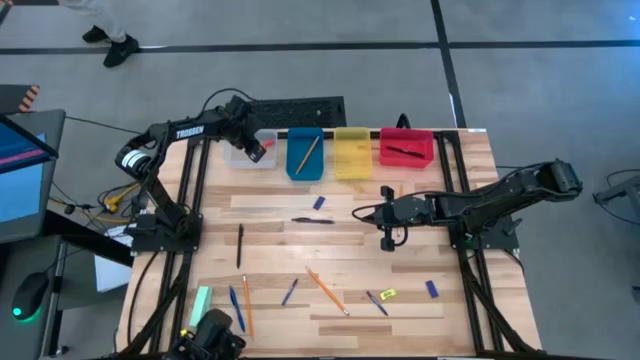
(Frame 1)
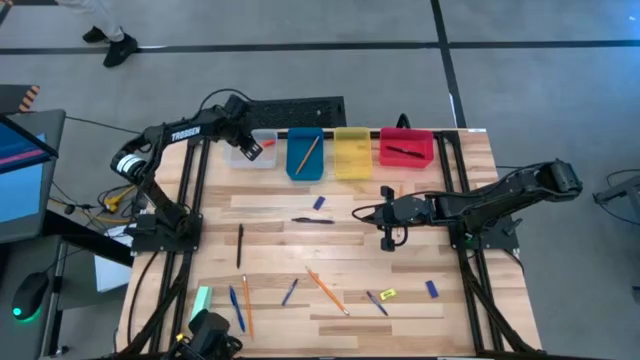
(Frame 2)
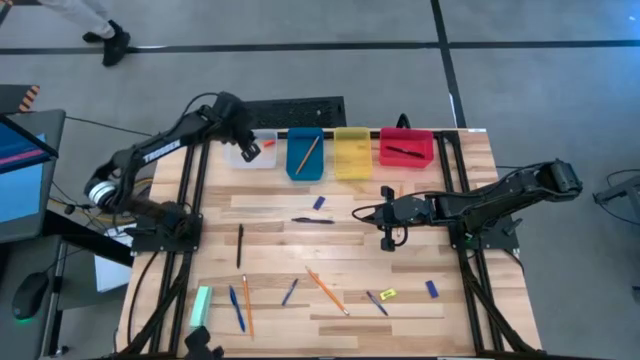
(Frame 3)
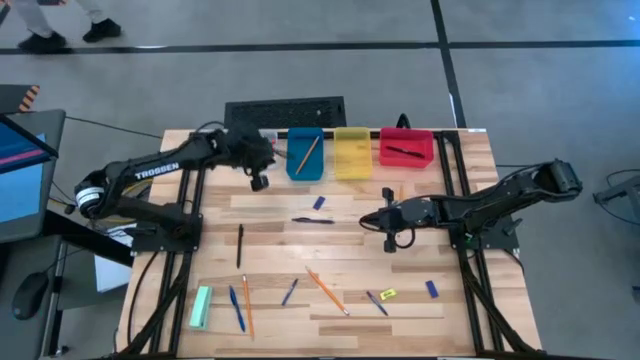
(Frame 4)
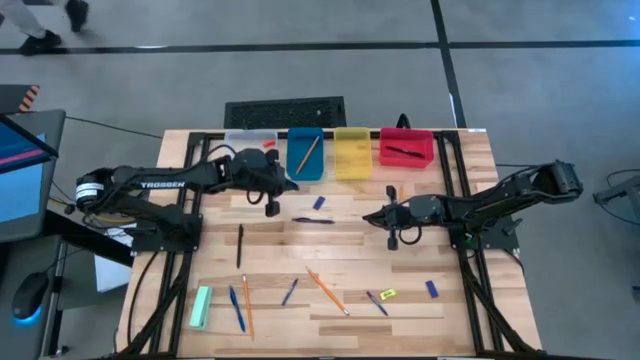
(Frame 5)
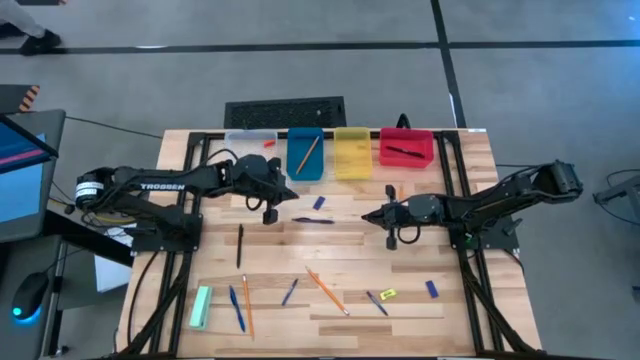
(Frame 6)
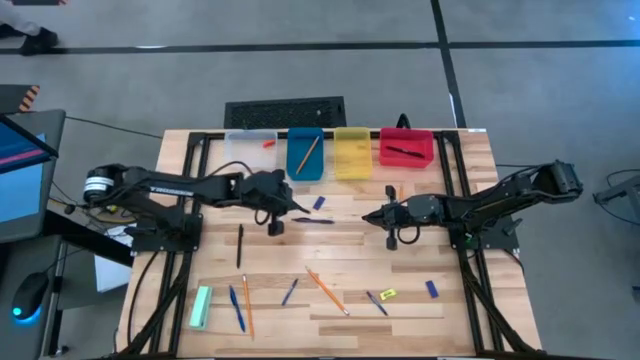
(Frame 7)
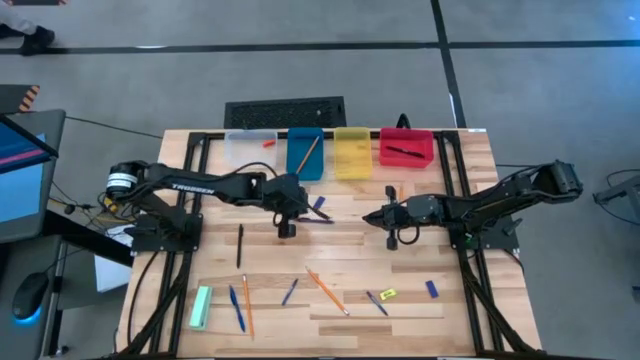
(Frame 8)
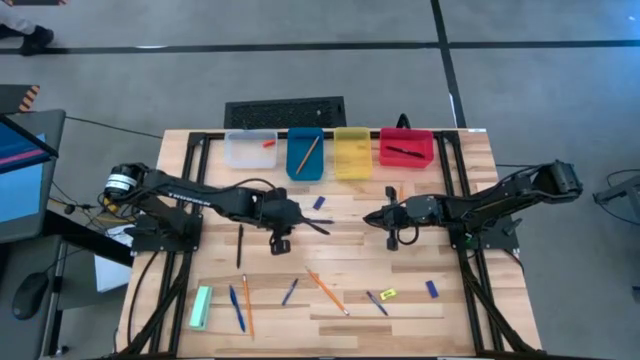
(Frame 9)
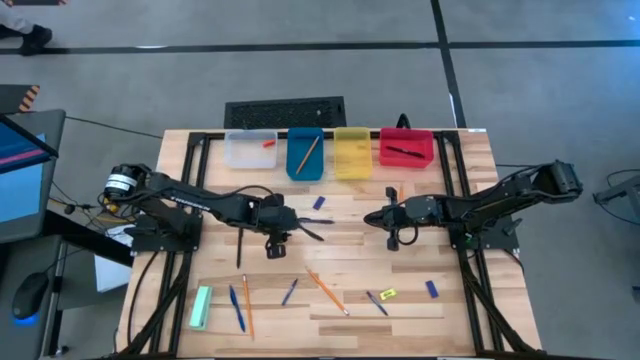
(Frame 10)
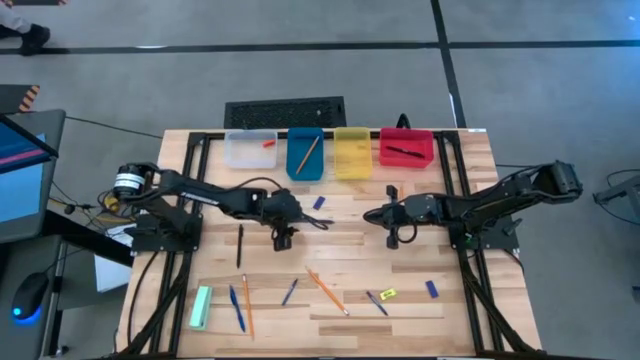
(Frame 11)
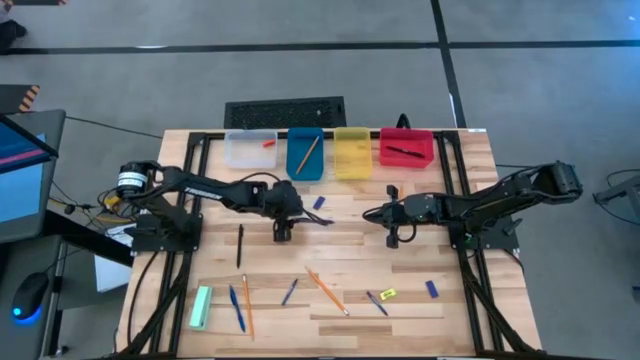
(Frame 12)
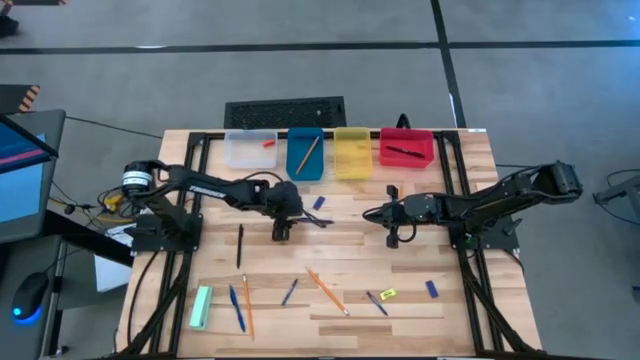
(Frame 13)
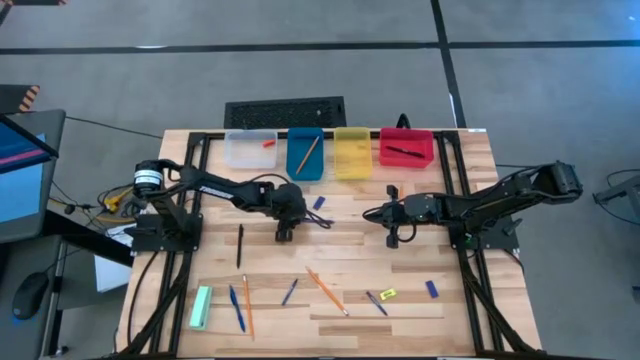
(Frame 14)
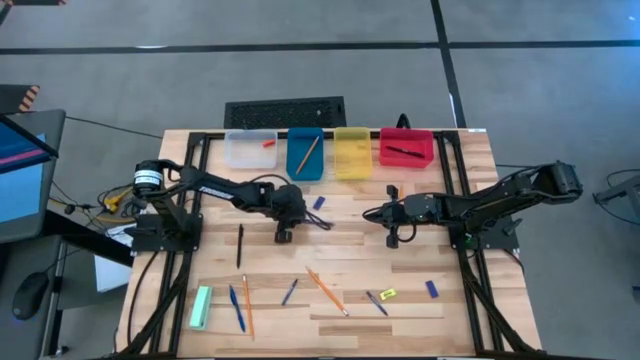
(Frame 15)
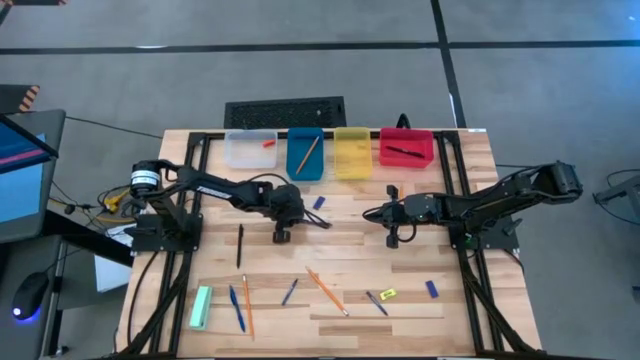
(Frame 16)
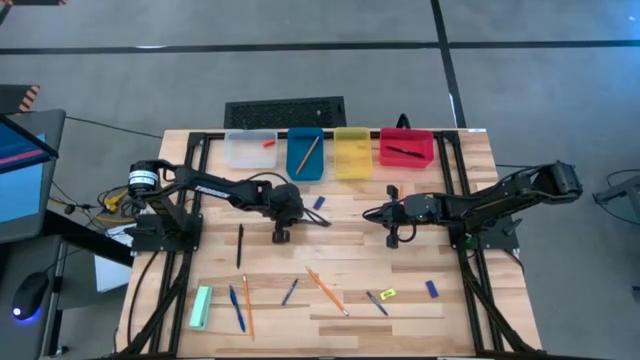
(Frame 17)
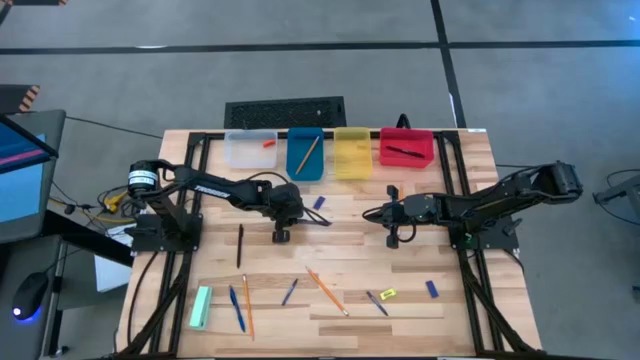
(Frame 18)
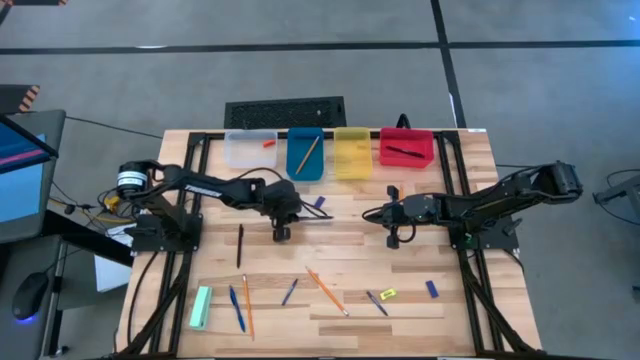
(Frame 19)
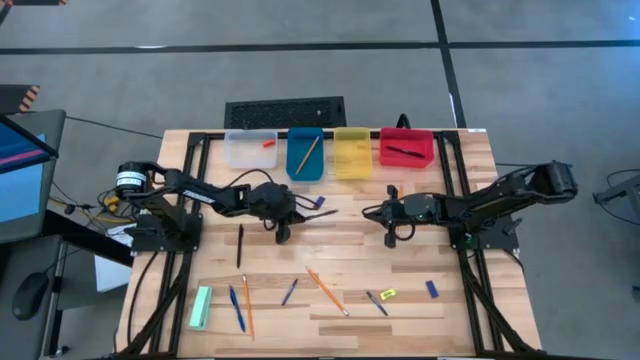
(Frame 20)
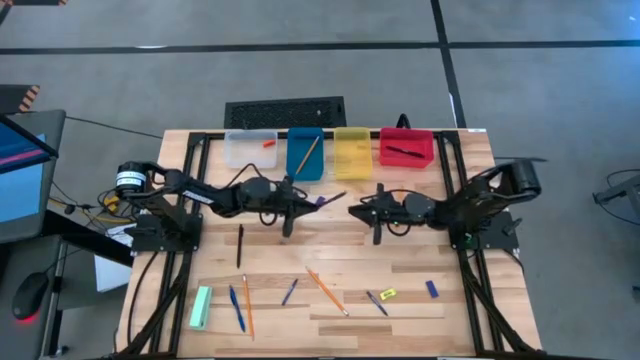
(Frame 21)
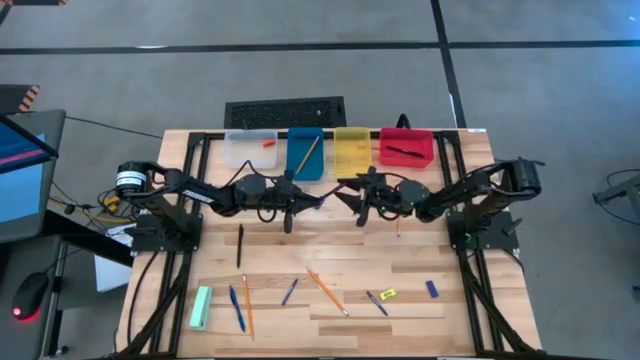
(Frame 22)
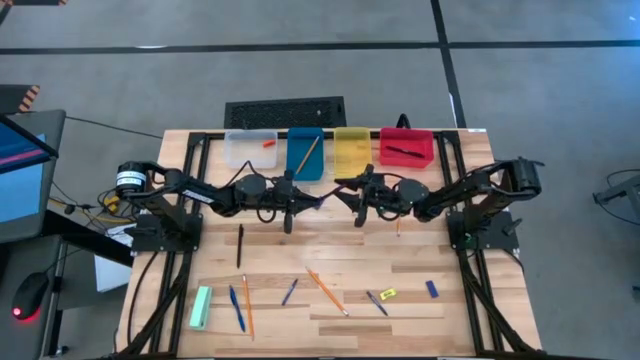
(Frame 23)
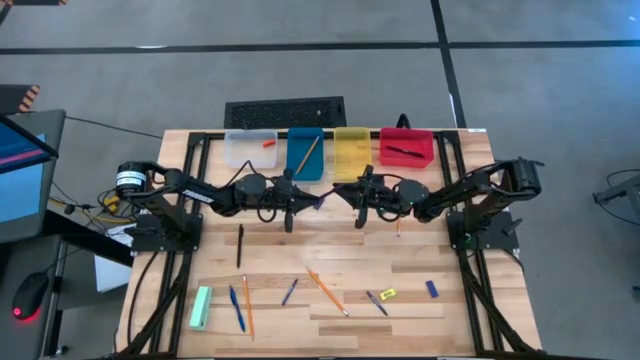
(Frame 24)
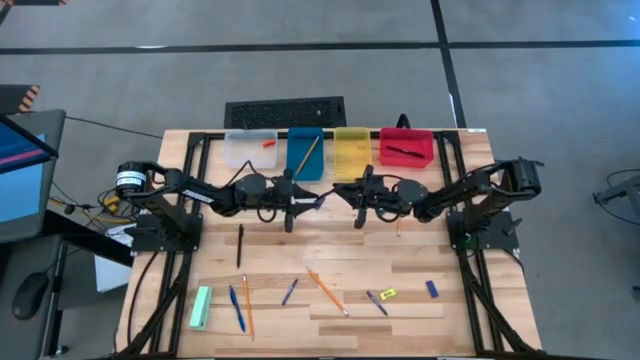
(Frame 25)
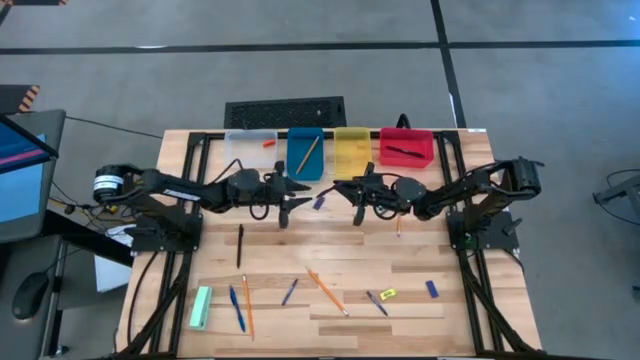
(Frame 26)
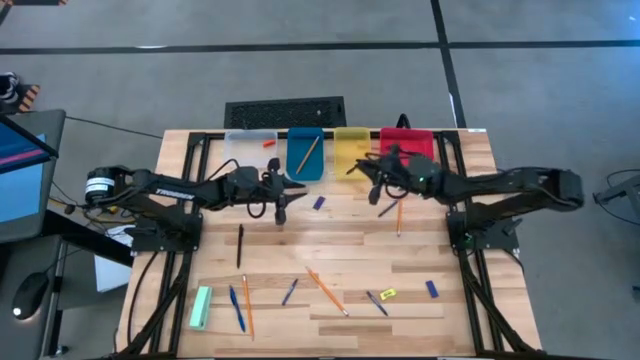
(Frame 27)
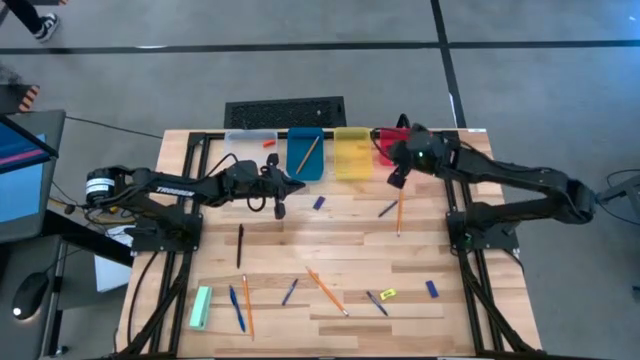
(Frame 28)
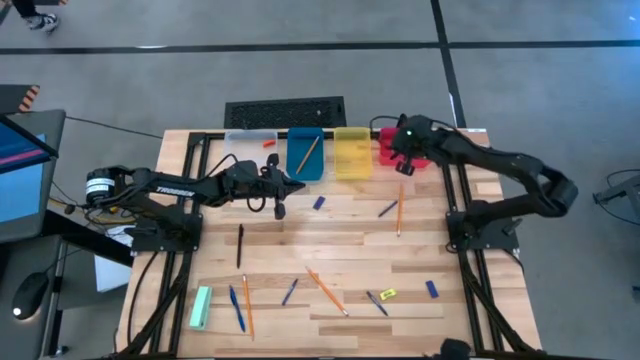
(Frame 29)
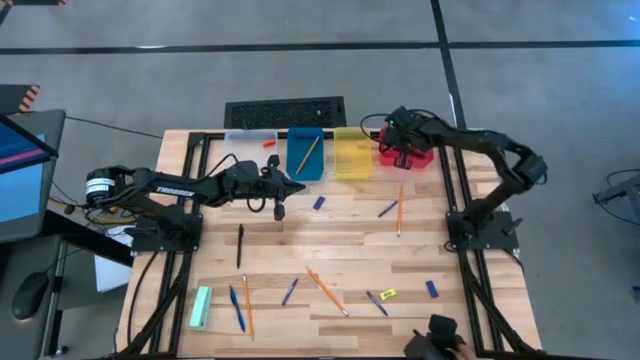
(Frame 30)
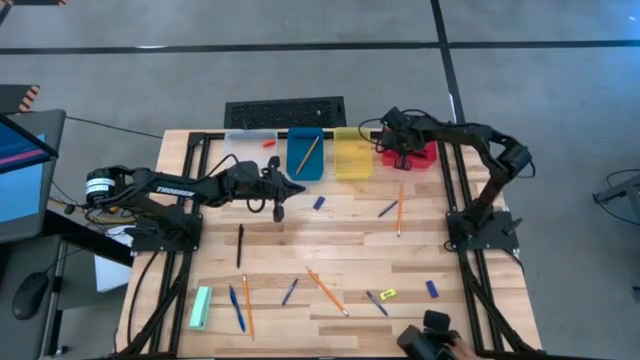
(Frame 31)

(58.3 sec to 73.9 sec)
Task: Sort crayons/erasers/pens/pencils in bins
Put the violet pen into the red bin

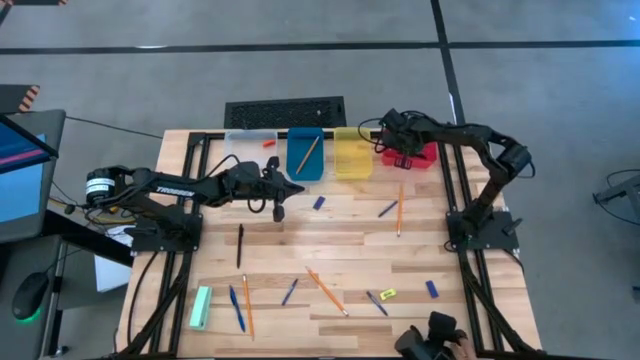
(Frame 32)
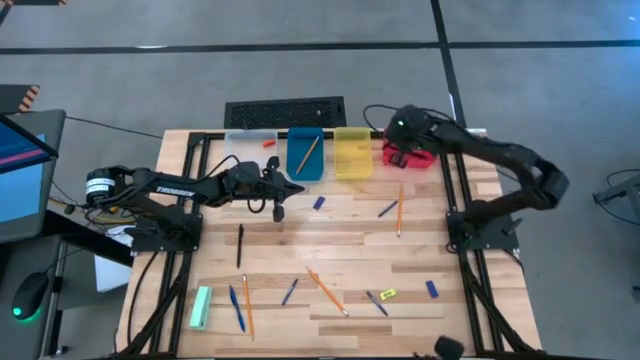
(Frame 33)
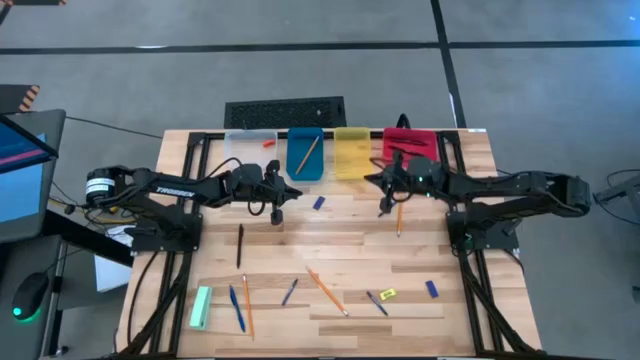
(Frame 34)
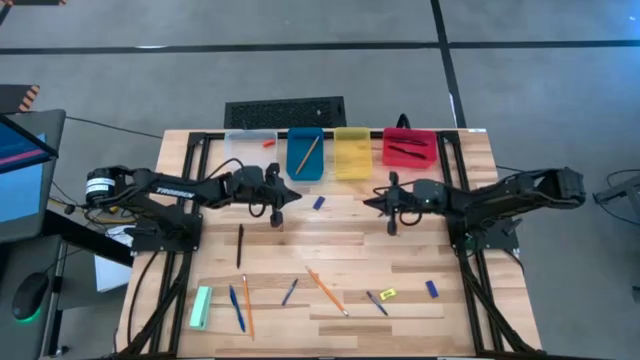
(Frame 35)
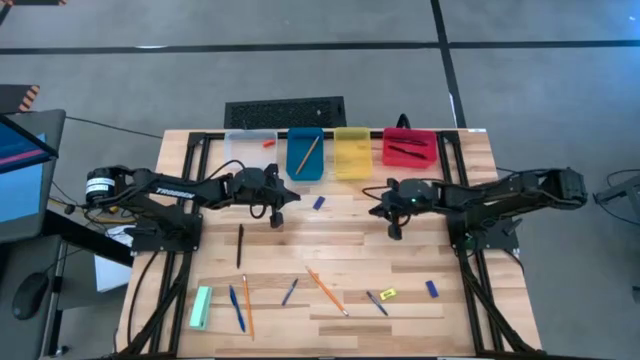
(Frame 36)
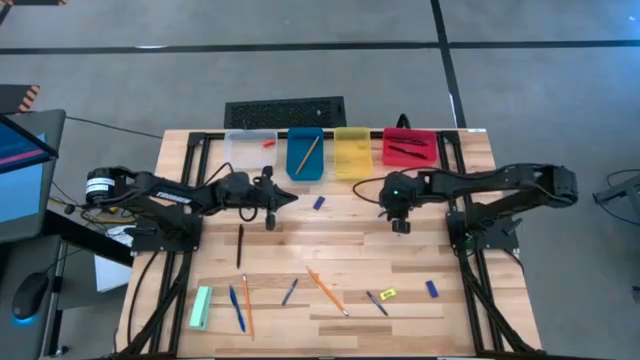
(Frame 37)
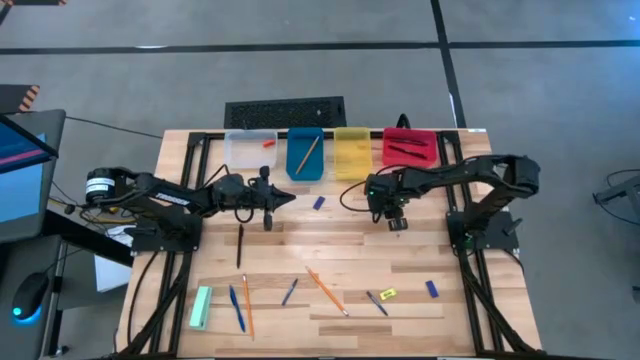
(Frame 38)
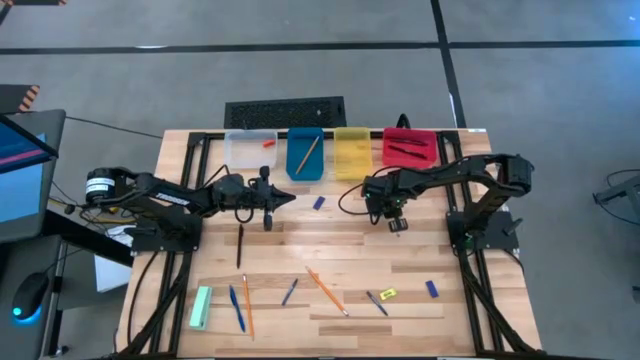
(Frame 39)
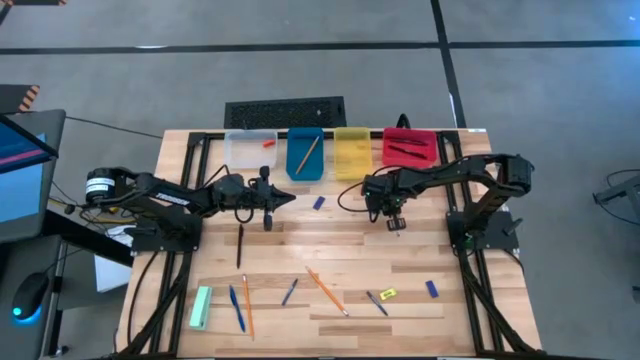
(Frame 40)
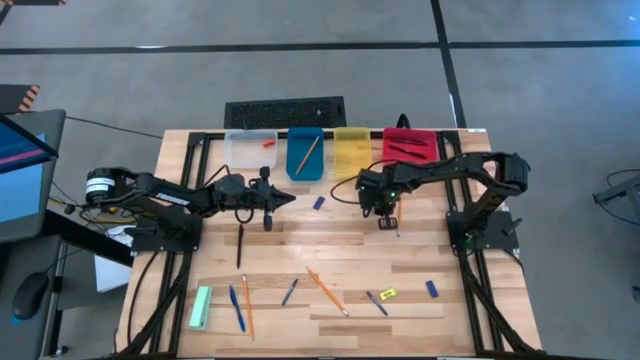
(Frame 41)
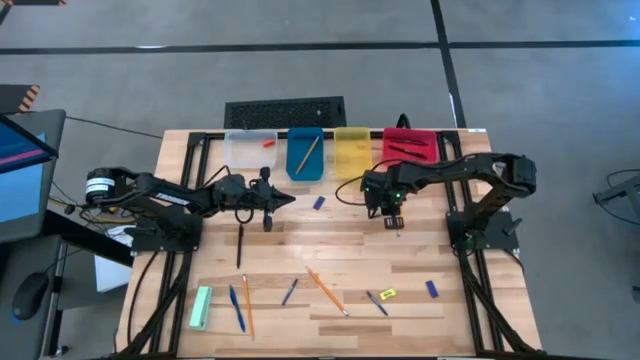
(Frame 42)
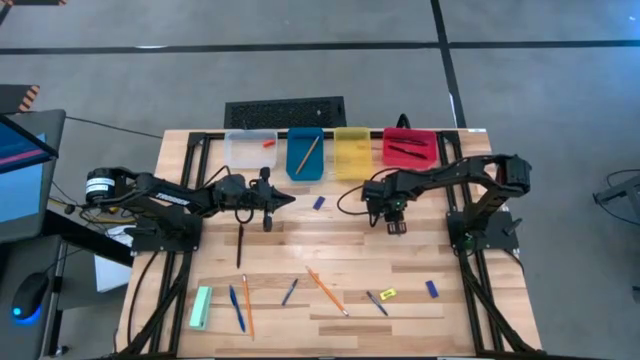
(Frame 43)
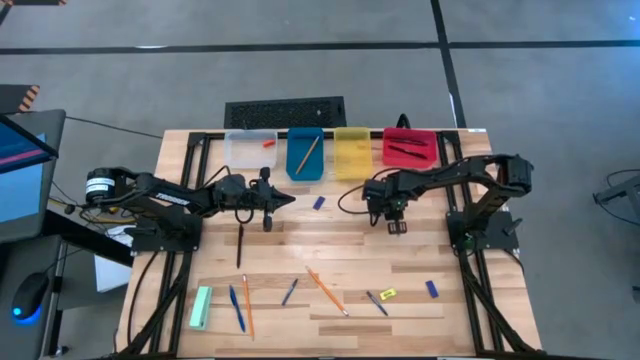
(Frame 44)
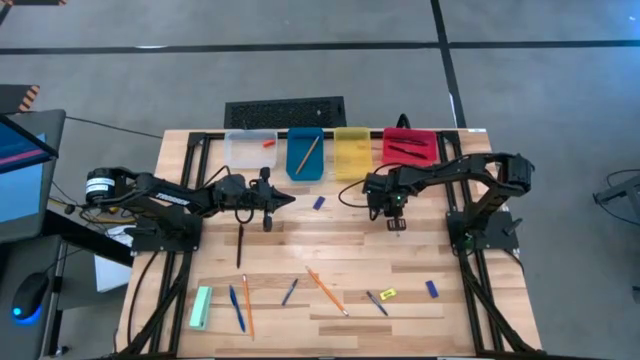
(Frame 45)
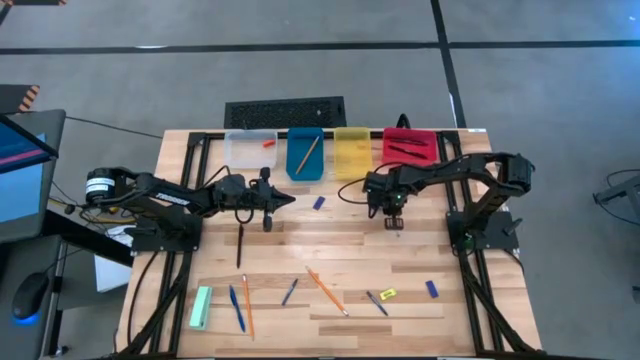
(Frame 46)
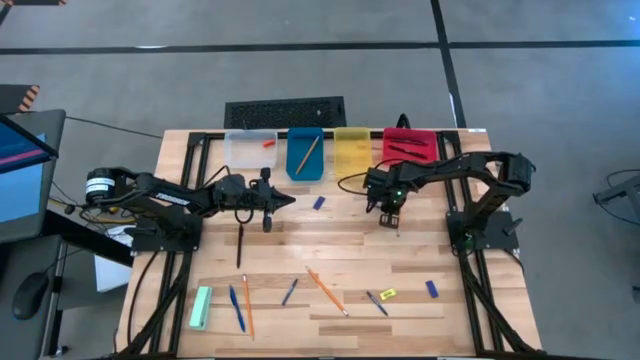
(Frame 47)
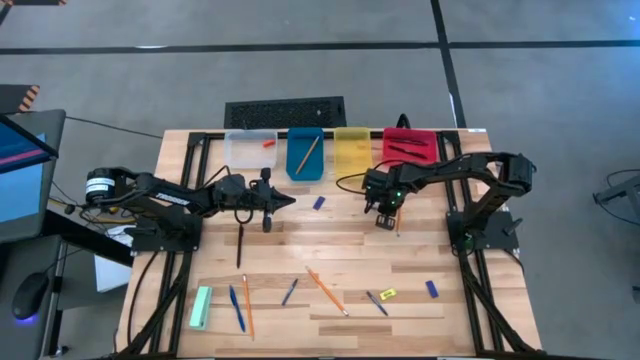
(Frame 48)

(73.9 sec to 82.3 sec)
Put the blue crayon into the yellow bin
